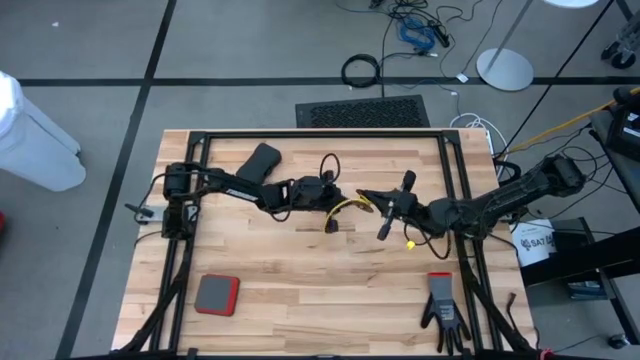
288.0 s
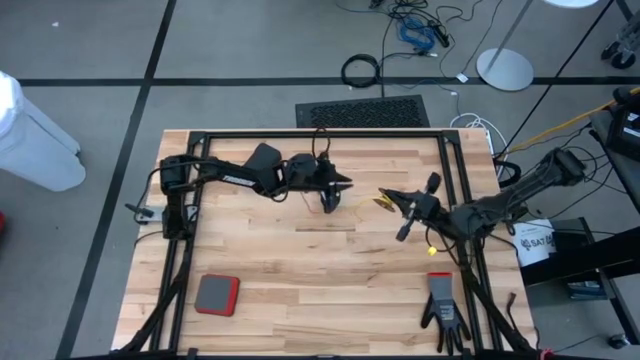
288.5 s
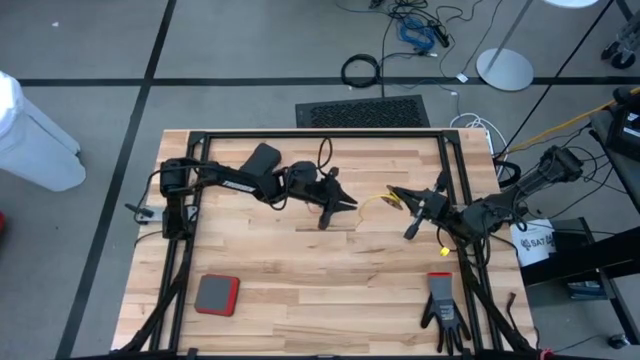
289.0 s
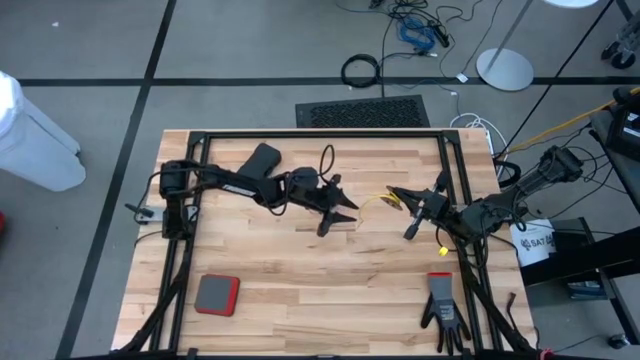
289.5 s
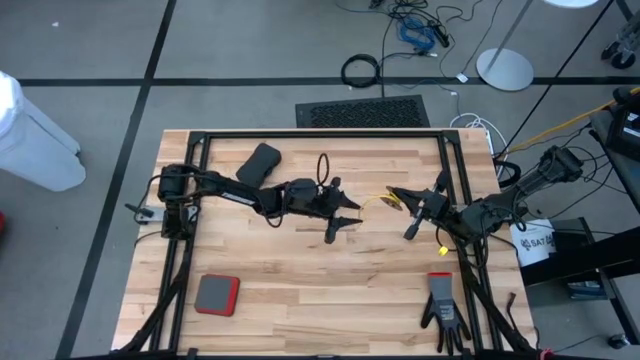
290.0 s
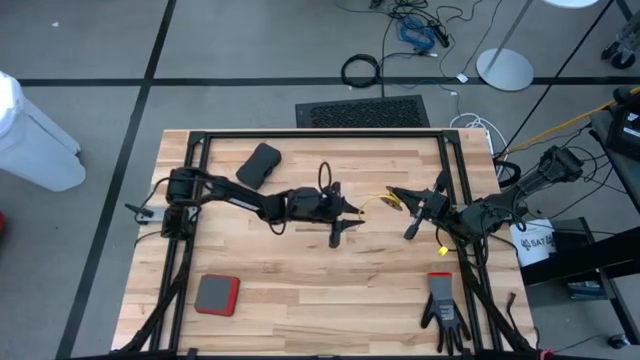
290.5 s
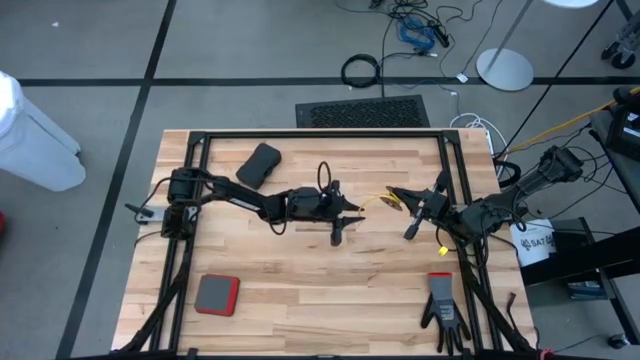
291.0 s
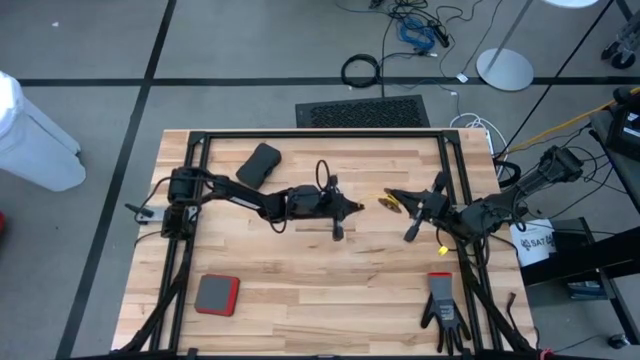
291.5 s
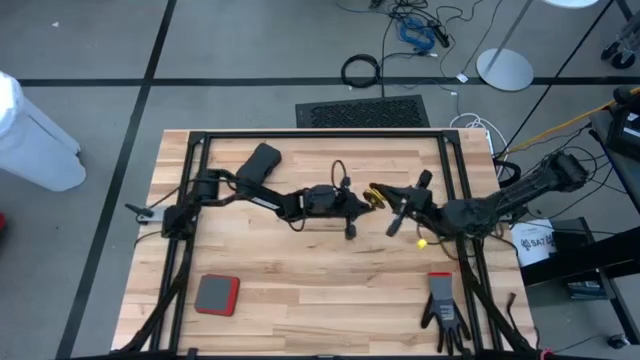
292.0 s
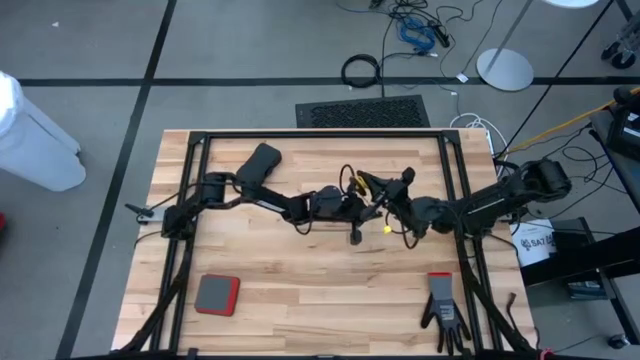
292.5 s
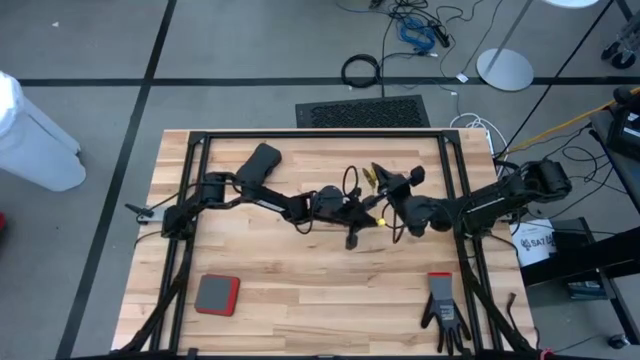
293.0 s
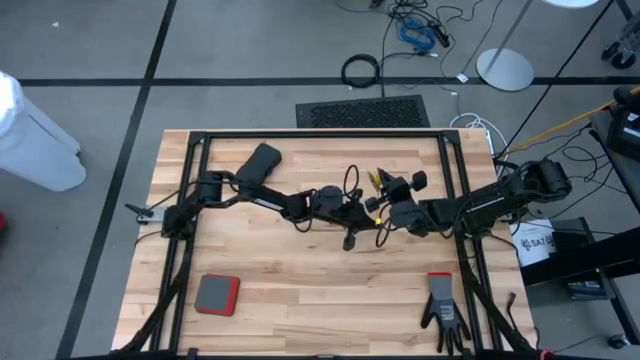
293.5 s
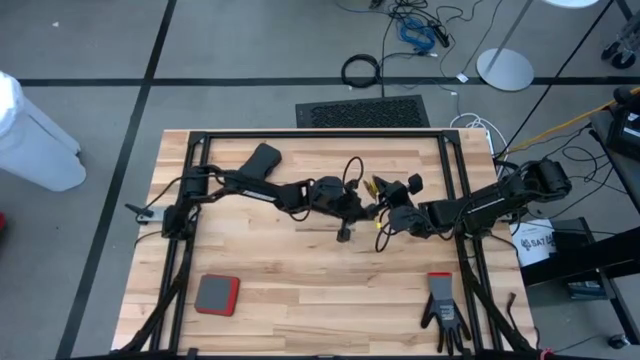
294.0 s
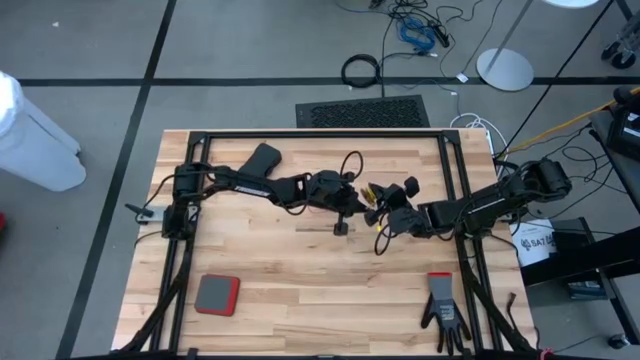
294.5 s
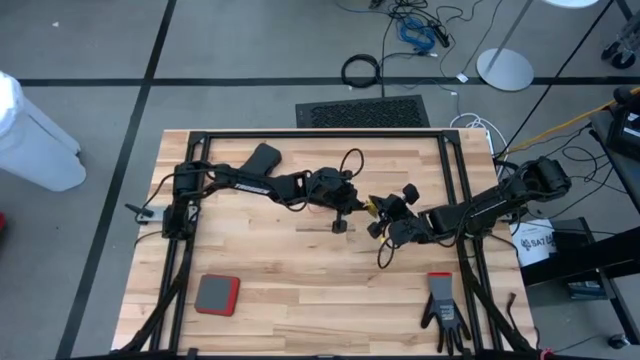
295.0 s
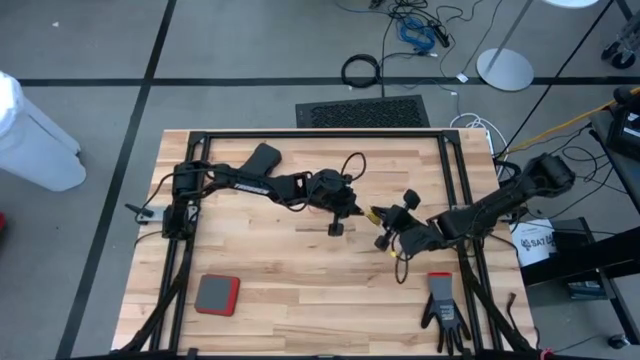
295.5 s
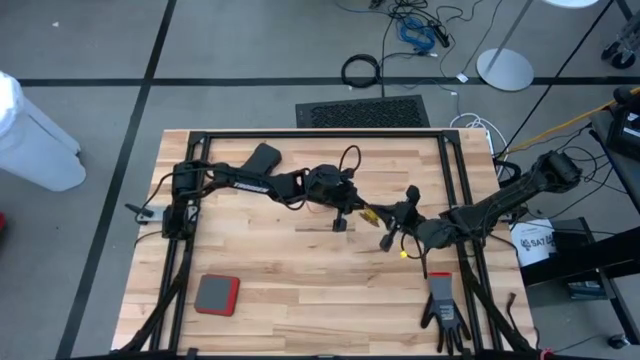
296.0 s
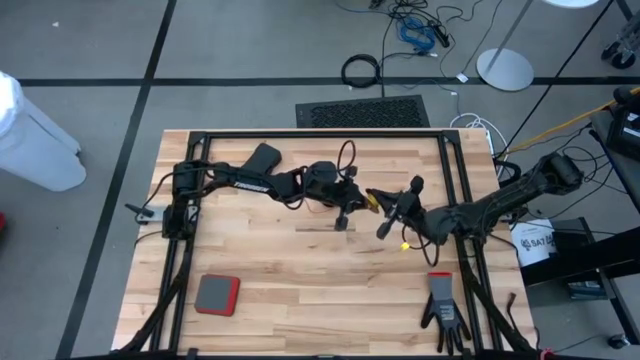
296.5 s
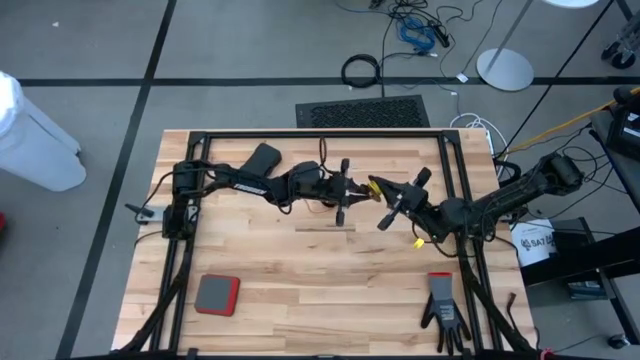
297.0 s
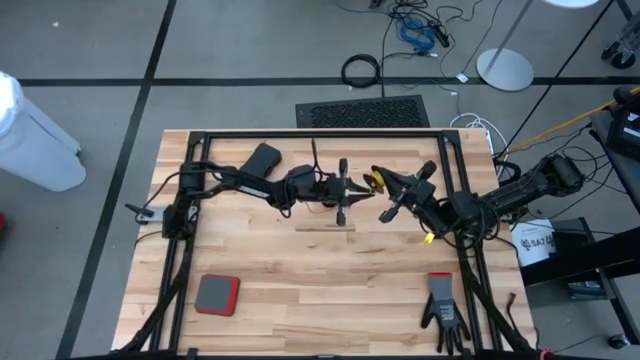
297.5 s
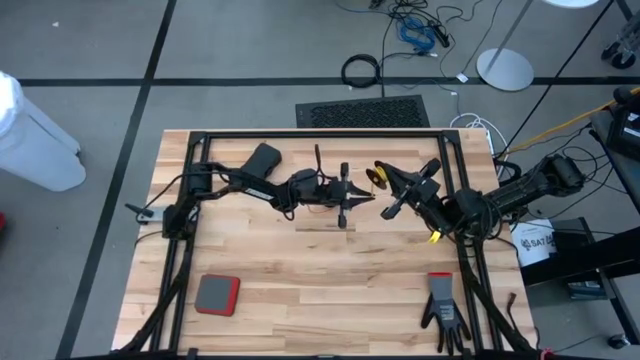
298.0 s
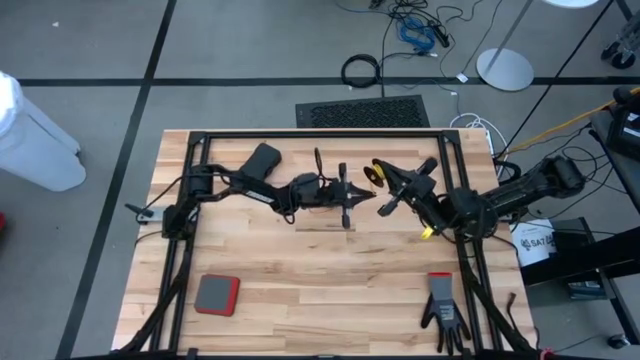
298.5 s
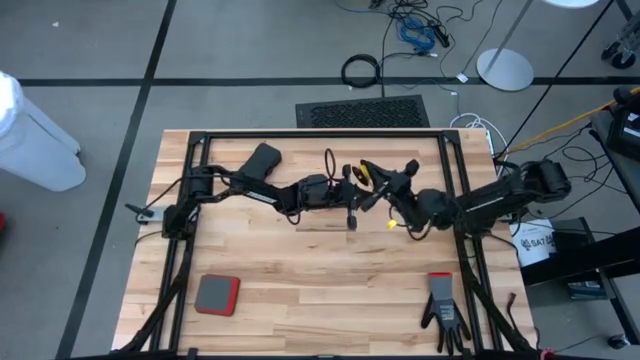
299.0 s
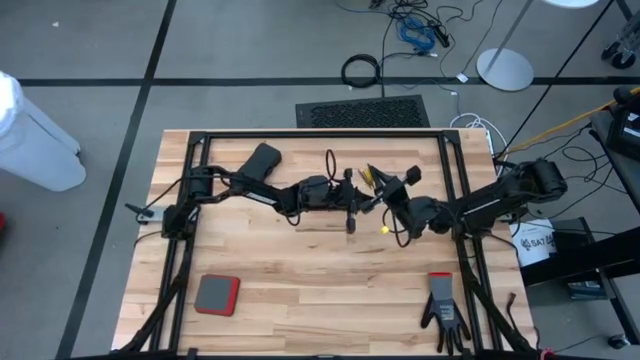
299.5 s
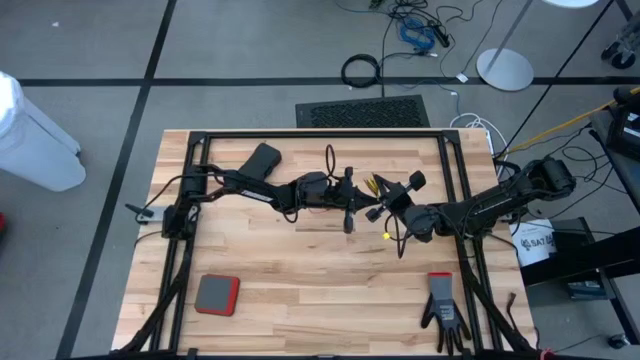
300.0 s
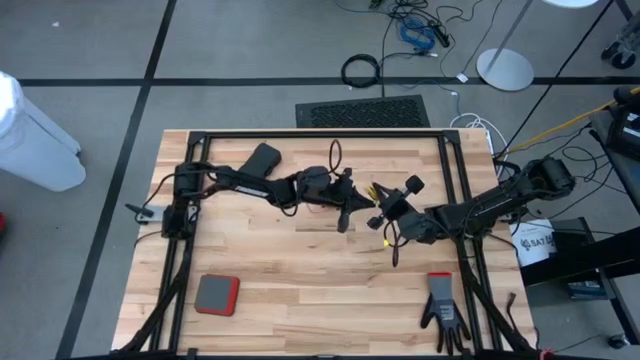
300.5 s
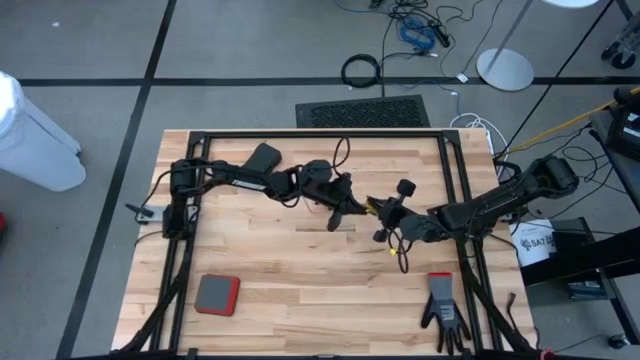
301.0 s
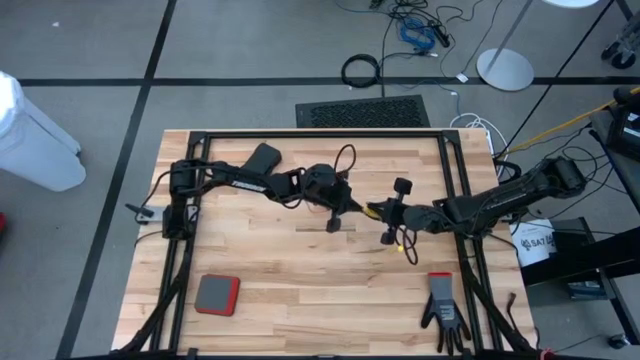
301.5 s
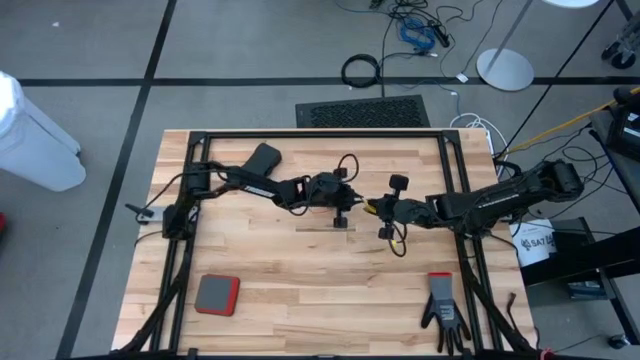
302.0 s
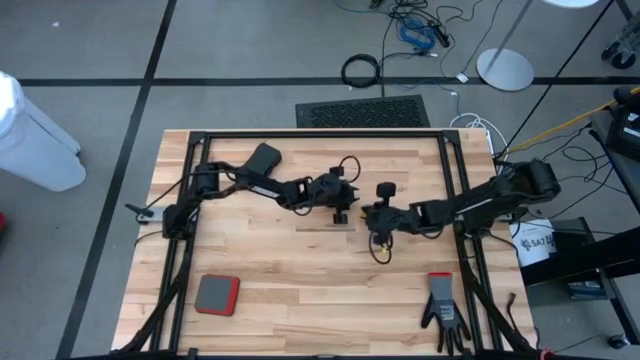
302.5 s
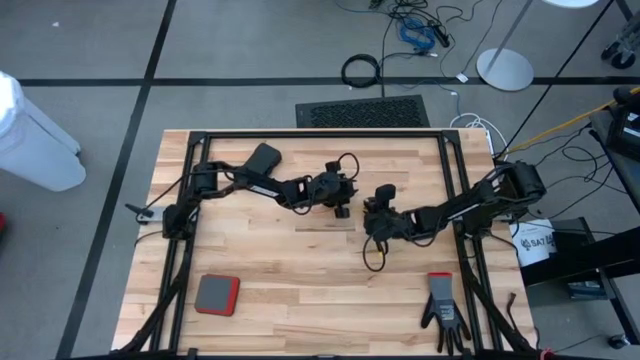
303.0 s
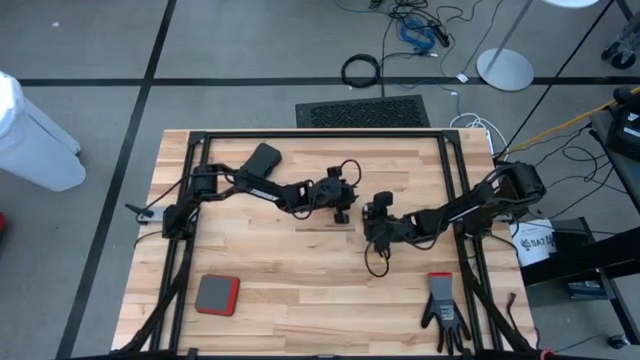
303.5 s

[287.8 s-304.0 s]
Task: Coil cords
Coil the yellow wire on the spool

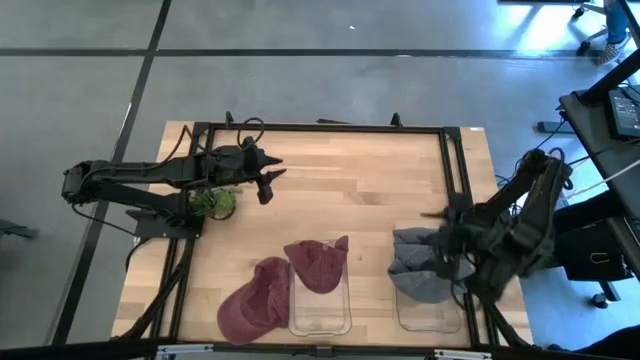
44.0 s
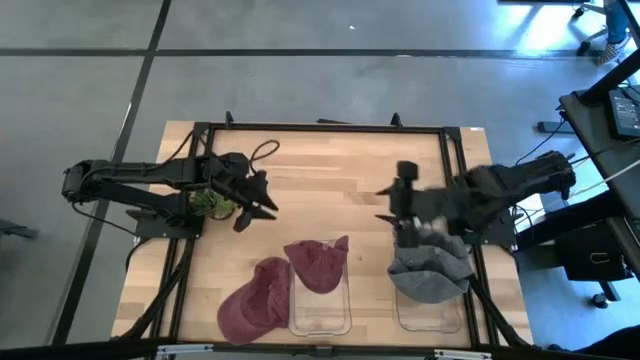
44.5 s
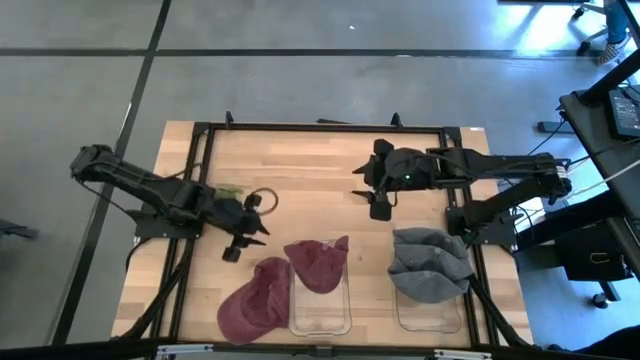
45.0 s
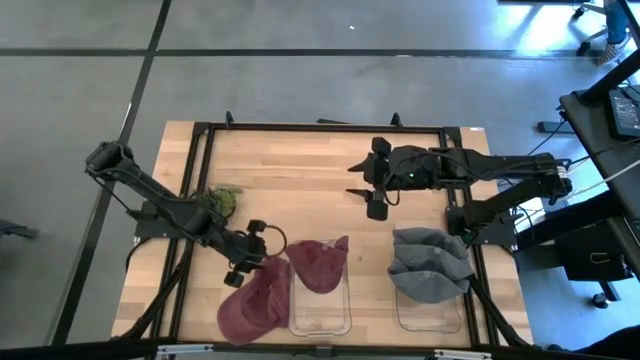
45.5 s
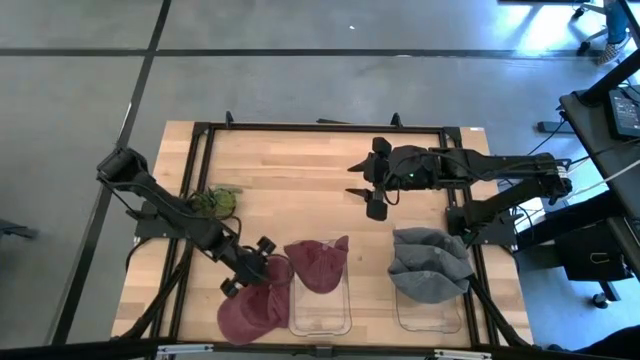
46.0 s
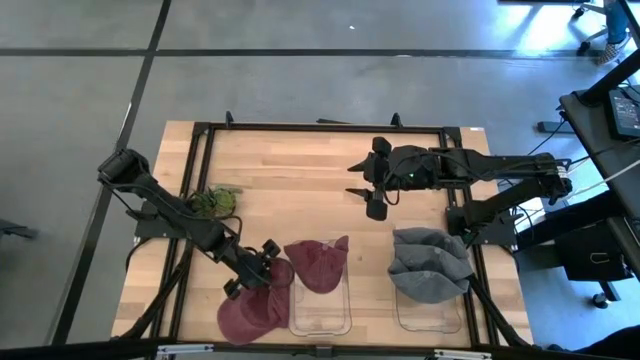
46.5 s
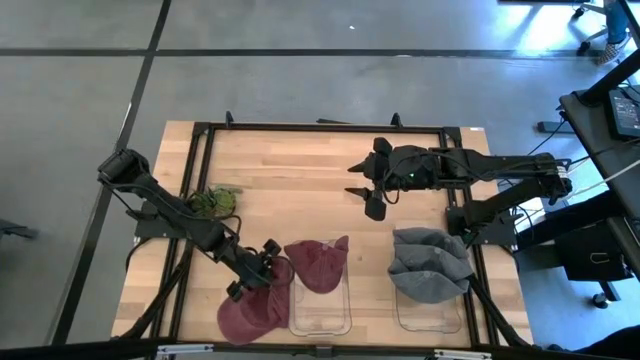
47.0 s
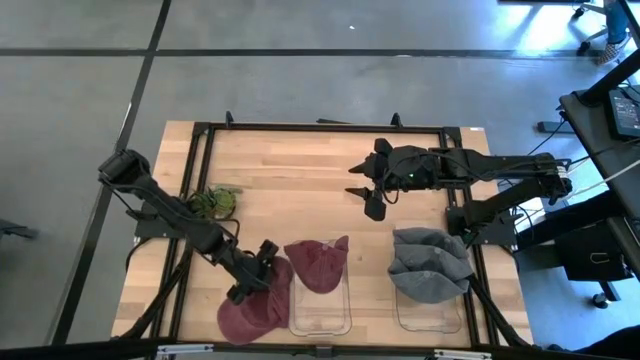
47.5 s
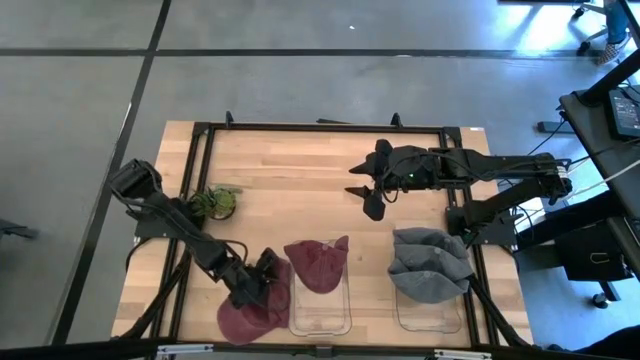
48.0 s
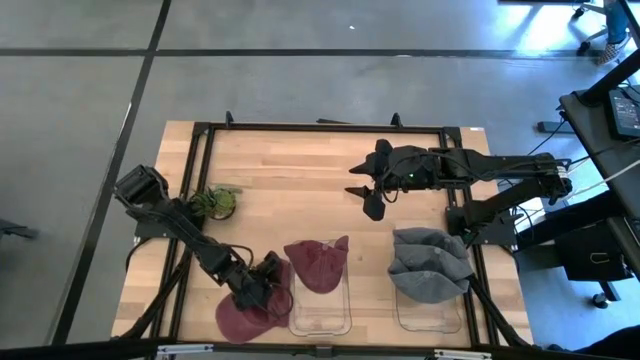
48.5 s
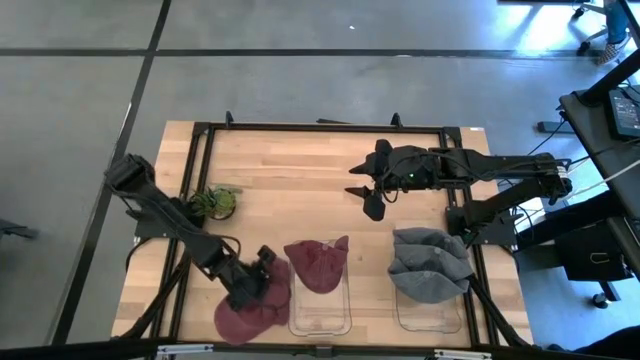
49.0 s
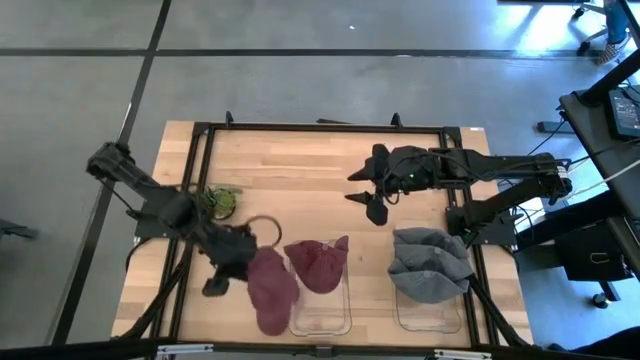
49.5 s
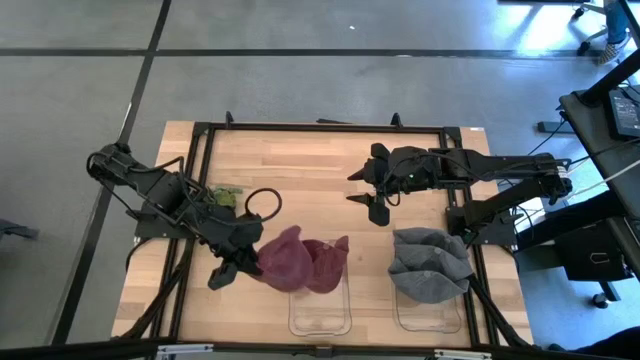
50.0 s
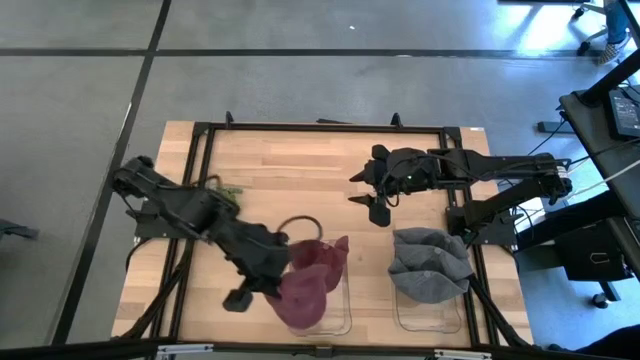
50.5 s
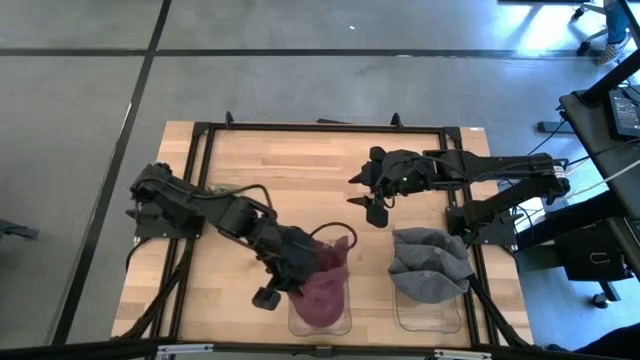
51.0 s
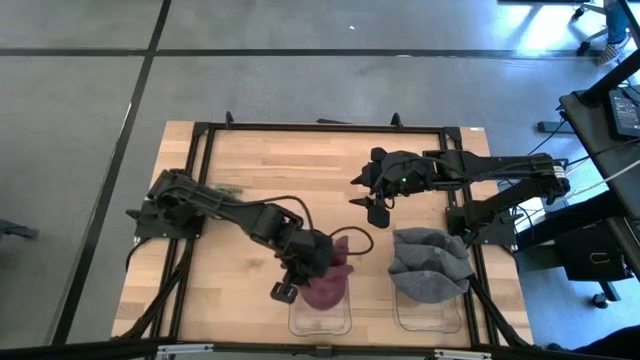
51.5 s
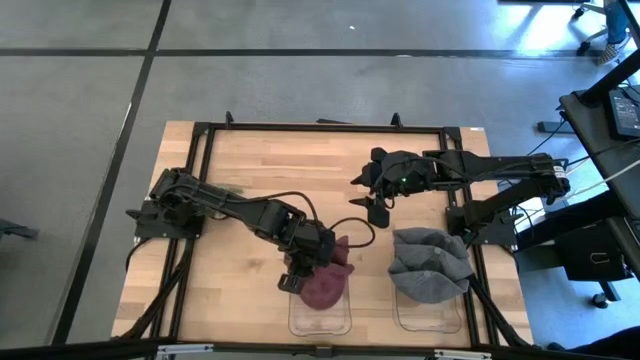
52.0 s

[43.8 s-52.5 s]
Task: Pick & Place hat
Put the red cap into the left transparent bin
